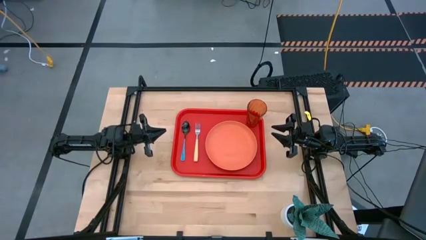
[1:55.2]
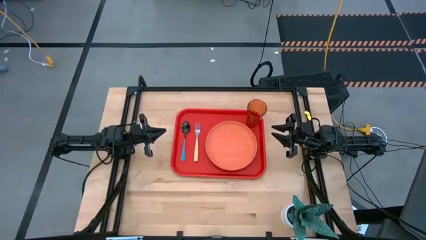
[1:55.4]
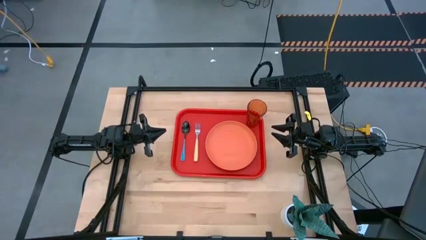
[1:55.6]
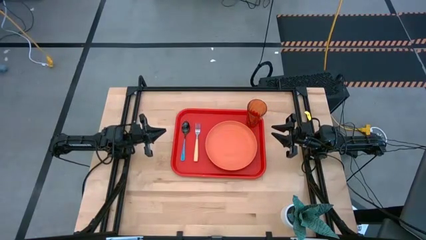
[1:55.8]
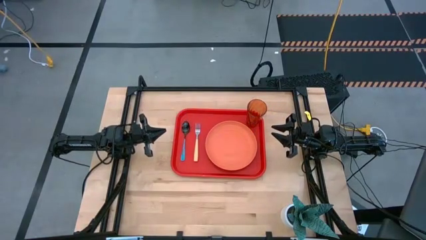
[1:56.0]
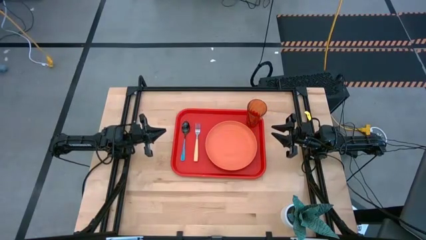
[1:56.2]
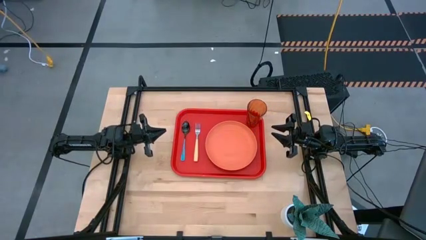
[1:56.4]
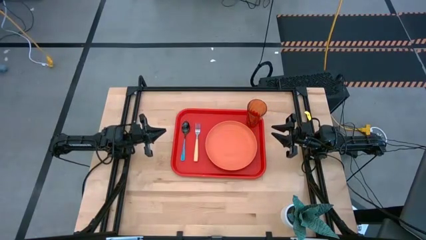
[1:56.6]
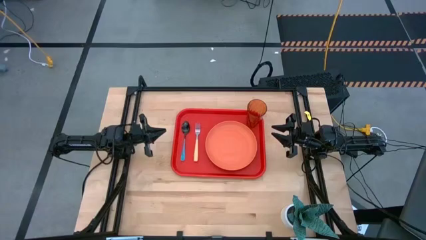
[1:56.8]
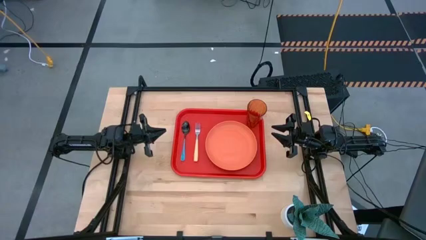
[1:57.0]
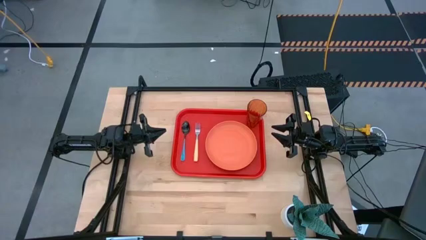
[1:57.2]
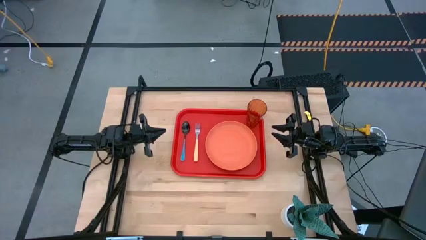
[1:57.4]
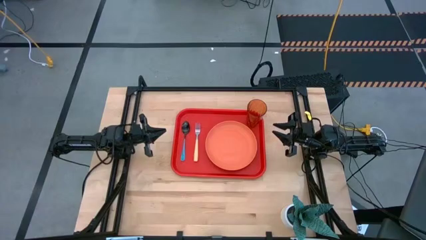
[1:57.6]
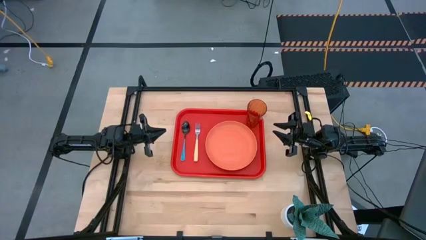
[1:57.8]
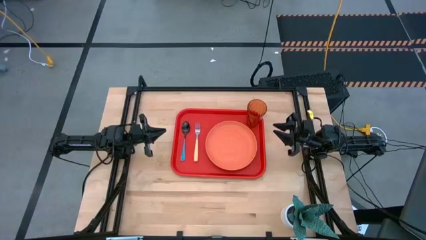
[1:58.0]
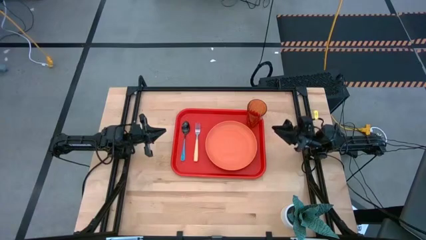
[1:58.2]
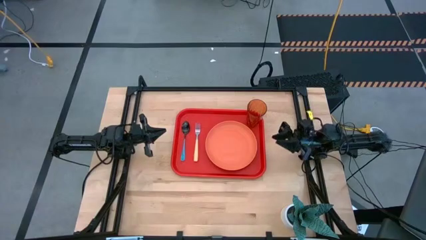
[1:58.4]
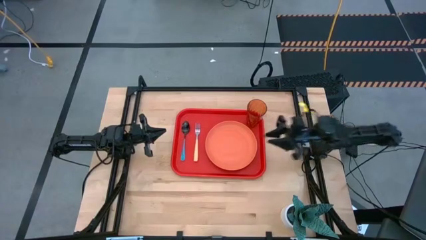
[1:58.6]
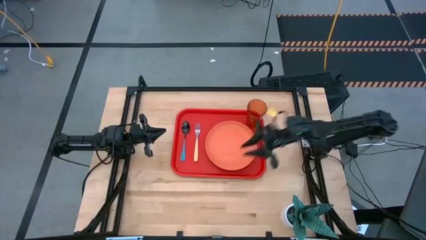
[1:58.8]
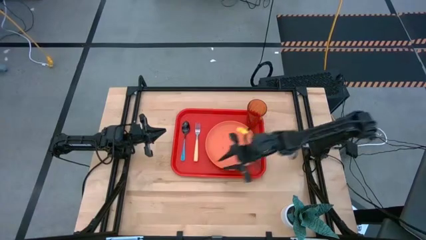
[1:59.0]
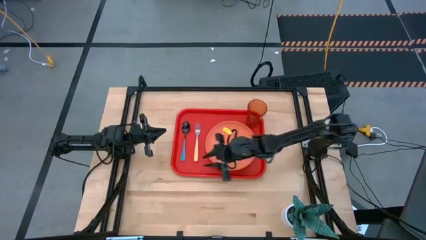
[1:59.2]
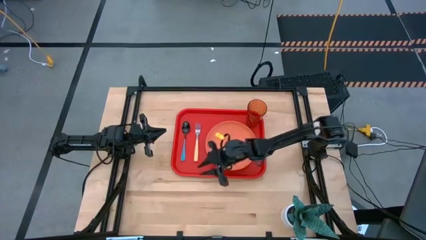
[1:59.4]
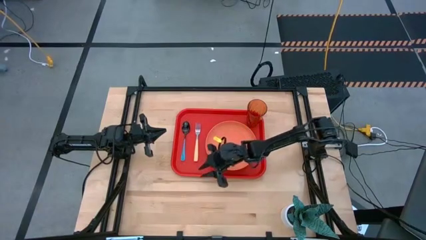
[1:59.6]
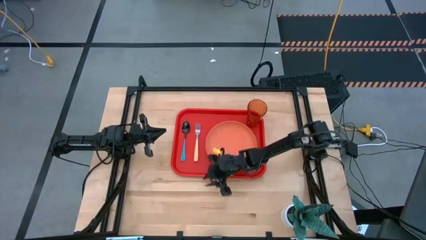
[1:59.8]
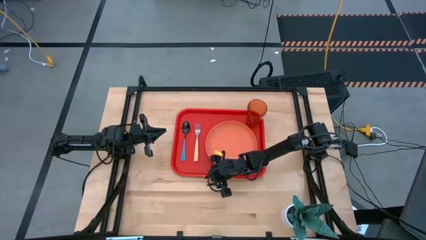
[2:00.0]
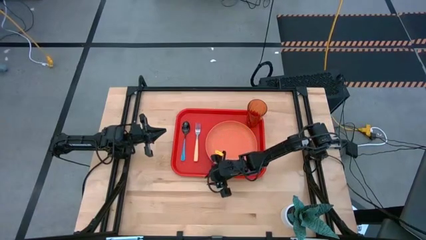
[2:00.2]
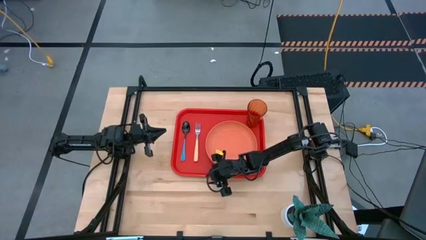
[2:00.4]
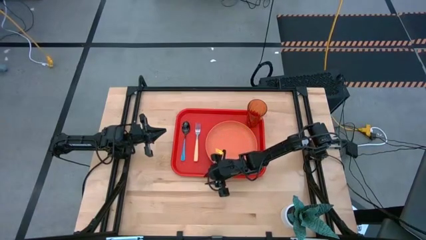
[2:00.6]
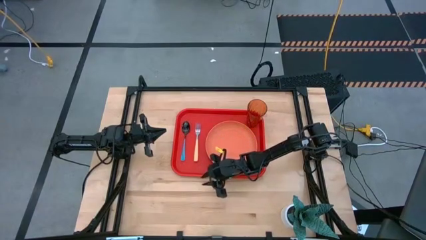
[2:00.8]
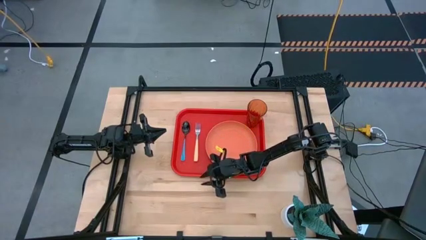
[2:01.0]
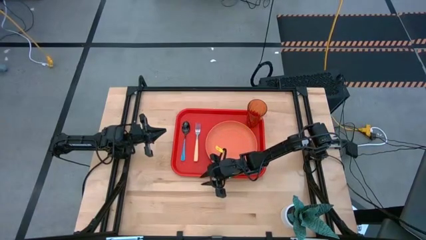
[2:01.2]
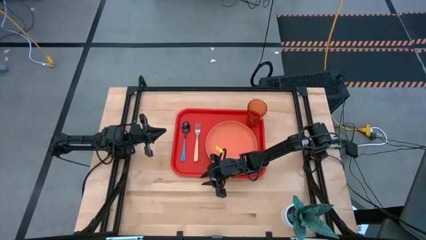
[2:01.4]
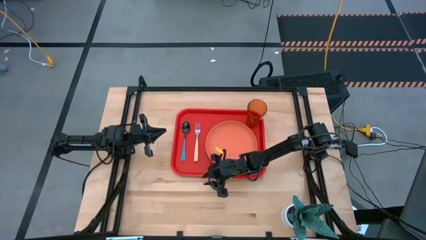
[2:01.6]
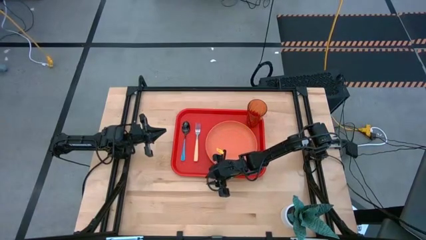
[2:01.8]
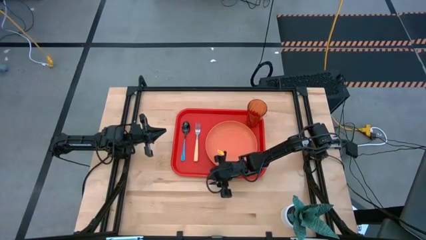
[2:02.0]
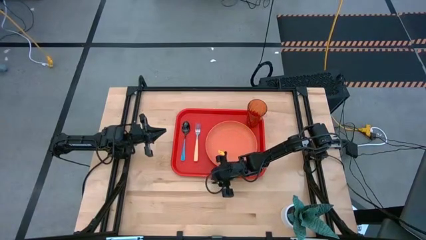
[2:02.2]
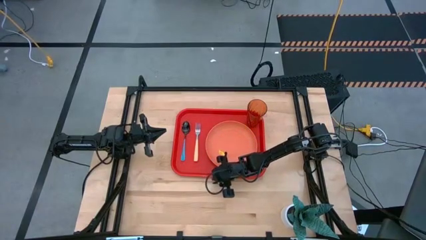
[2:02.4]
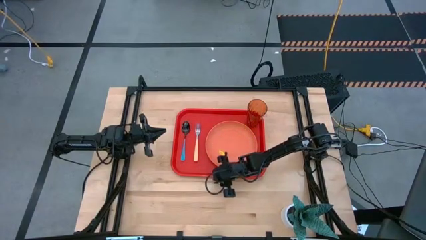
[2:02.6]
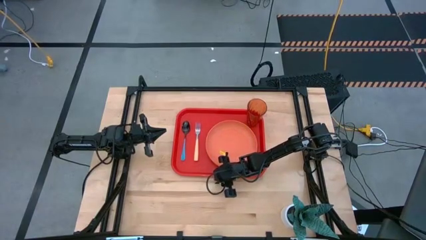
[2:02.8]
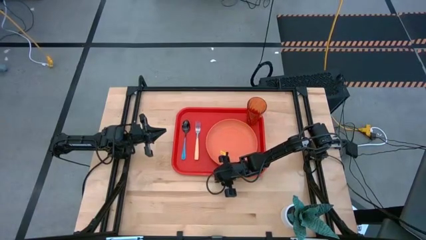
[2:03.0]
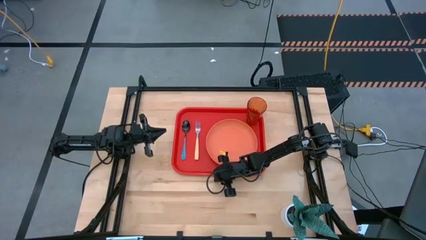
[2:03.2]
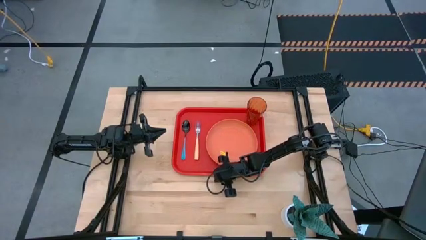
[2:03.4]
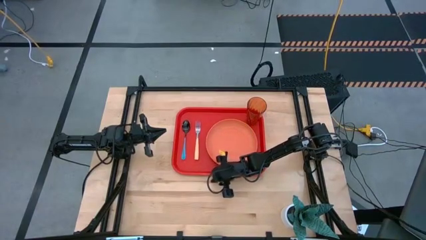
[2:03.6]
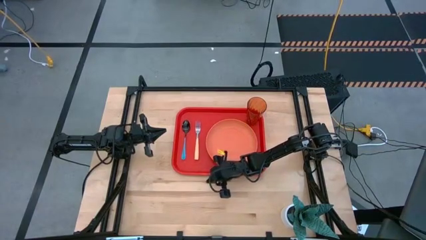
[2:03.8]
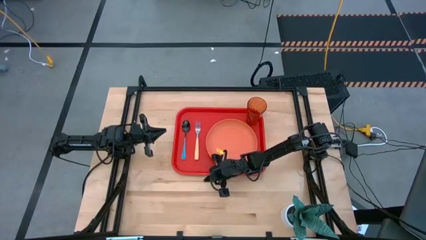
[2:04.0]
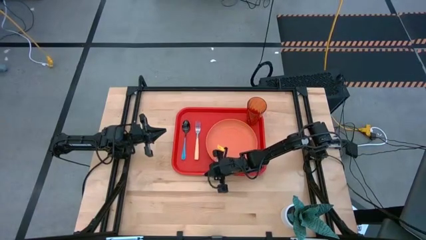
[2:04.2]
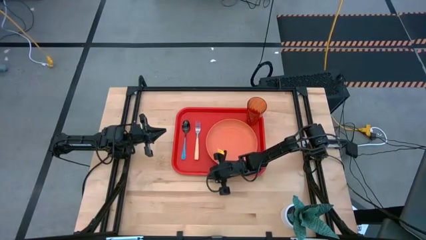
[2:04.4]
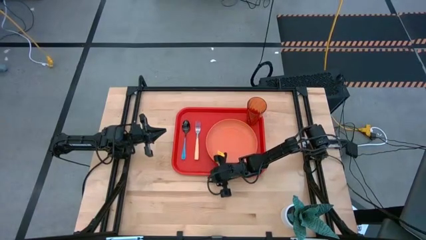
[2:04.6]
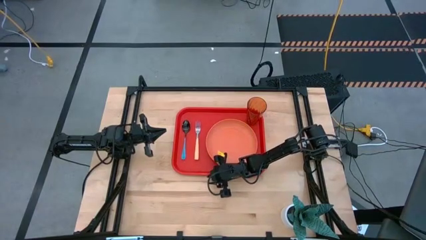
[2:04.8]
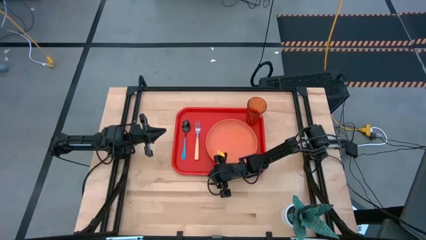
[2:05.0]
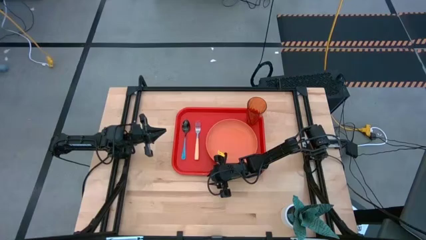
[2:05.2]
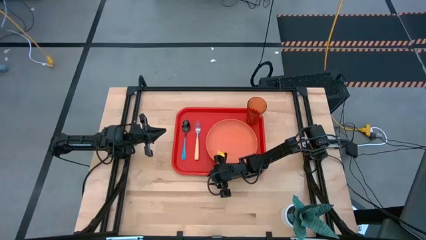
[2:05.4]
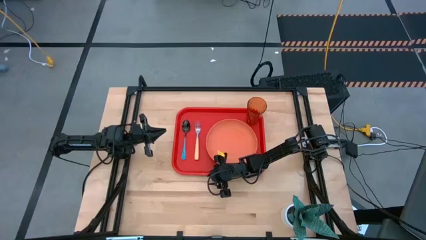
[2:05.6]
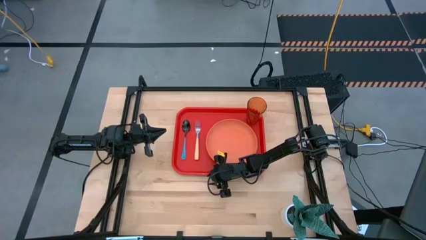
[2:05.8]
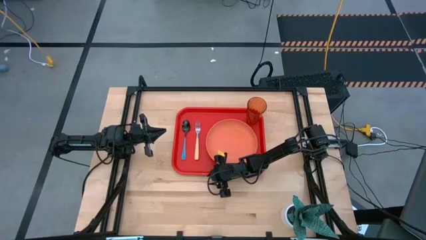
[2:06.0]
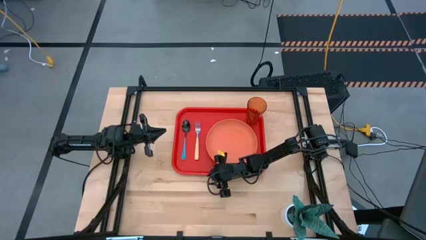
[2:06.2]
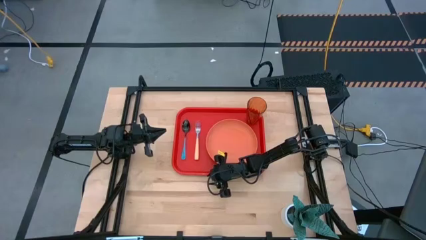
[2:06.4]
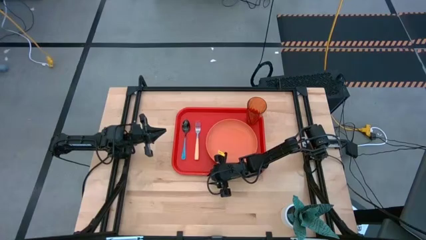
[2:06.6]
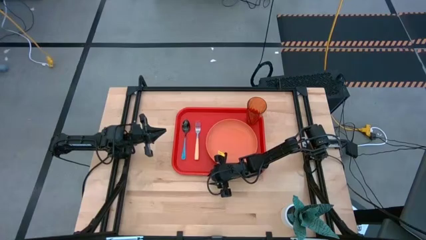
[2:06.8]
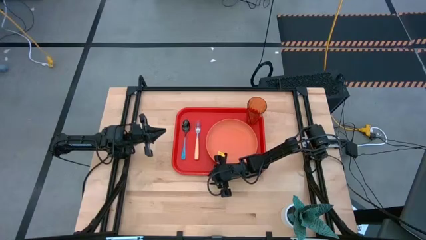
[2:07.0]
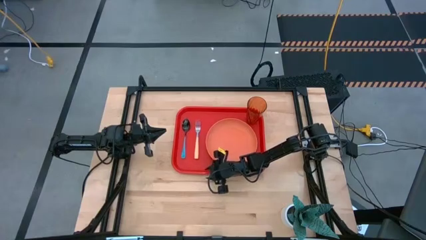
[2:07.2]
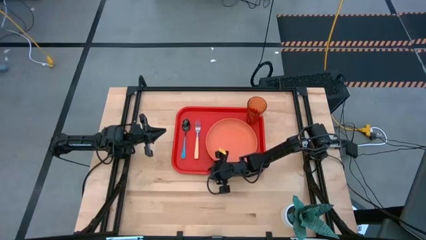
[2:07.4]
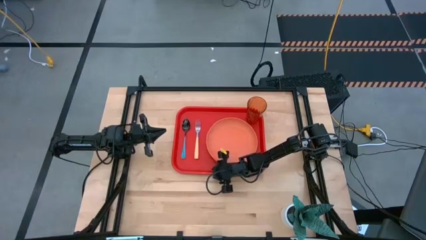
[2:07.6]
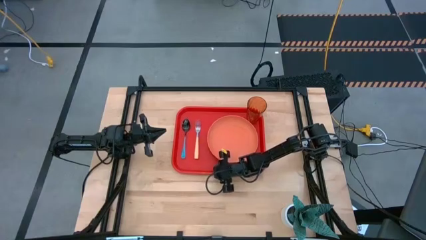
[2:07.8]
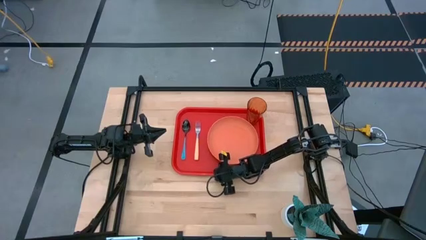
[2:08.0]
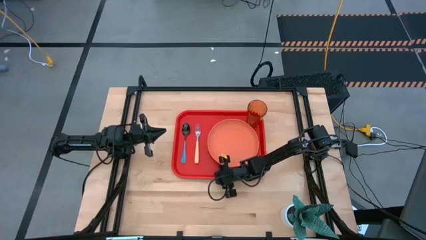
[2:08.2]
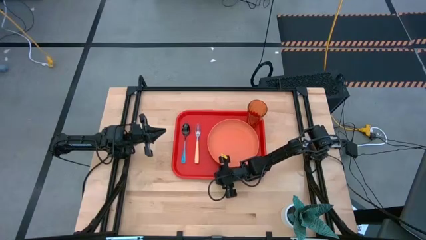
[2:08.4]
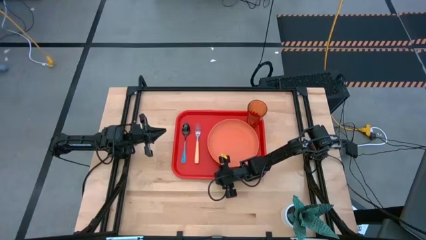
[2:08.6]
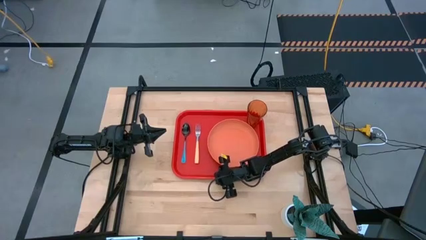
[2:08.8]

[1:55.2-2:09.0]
Task: Pick and place plate/cup/fork/spoon on tray
Adjust the blue spoon, orange plate, and the red tray

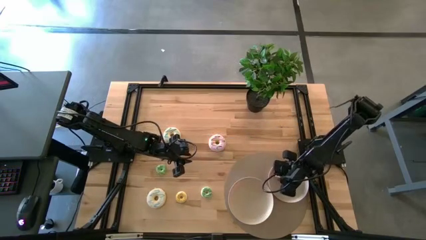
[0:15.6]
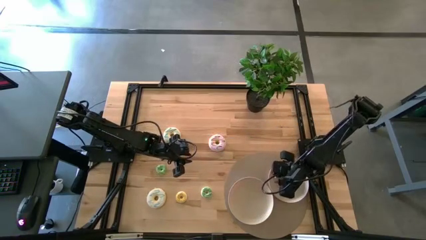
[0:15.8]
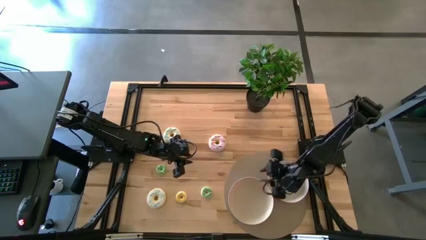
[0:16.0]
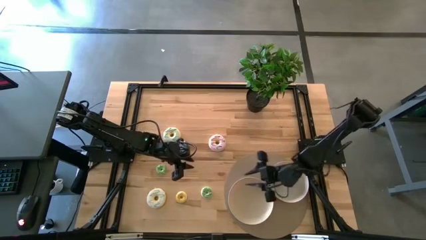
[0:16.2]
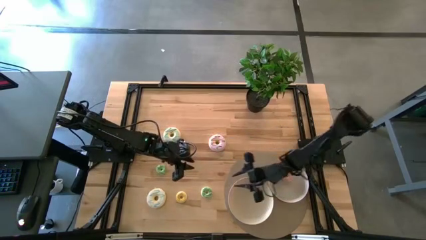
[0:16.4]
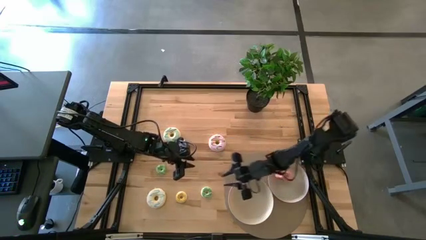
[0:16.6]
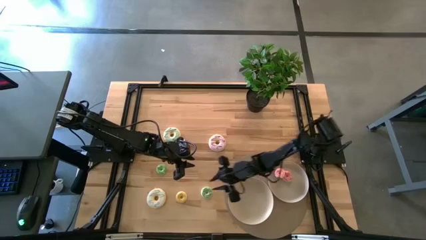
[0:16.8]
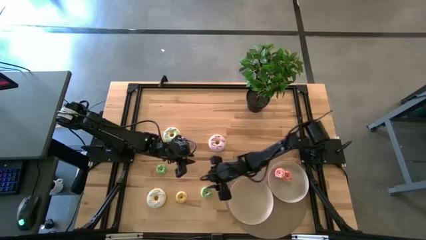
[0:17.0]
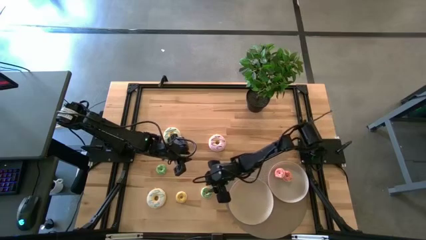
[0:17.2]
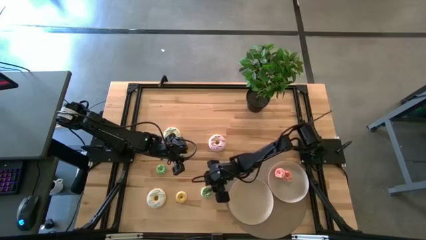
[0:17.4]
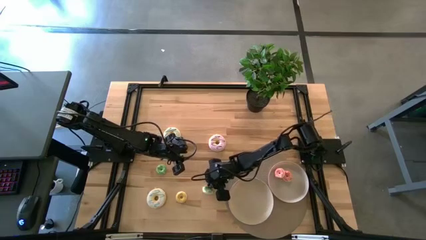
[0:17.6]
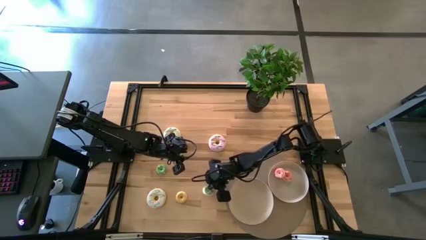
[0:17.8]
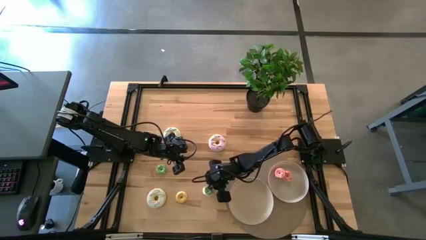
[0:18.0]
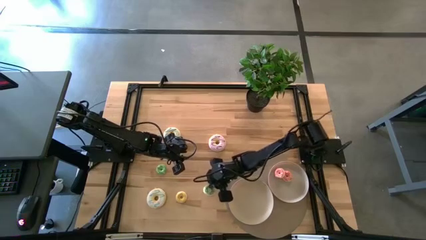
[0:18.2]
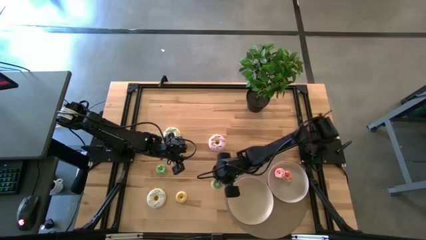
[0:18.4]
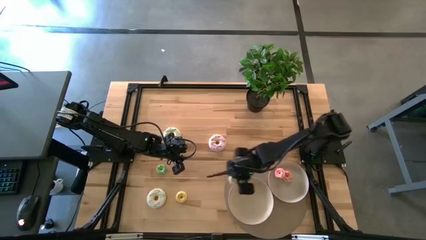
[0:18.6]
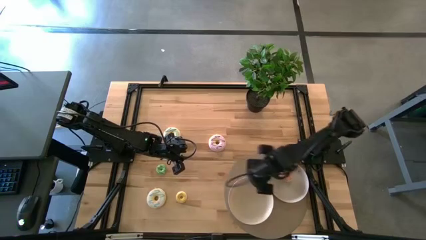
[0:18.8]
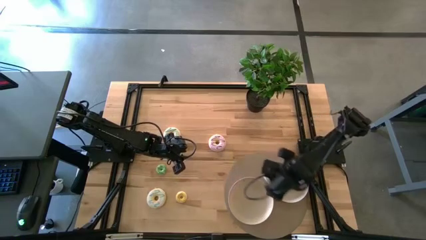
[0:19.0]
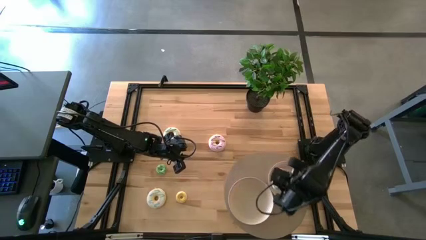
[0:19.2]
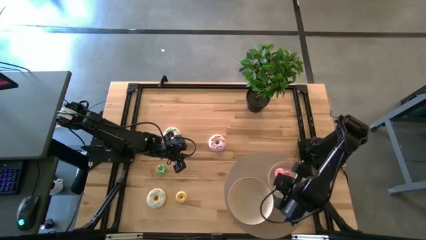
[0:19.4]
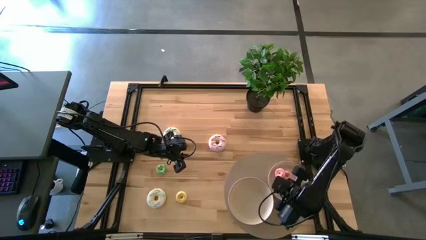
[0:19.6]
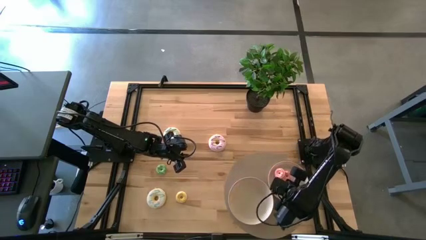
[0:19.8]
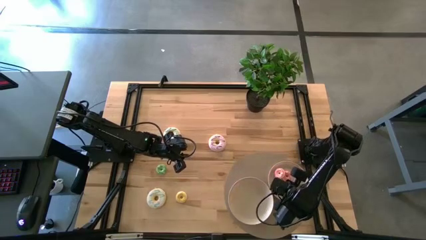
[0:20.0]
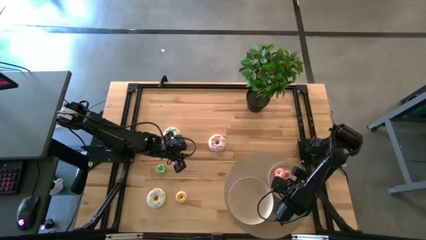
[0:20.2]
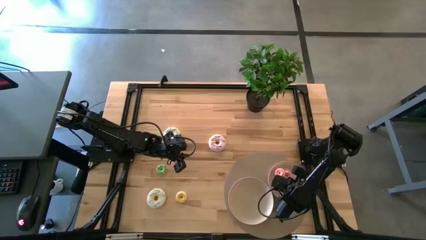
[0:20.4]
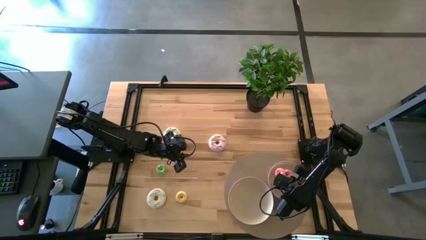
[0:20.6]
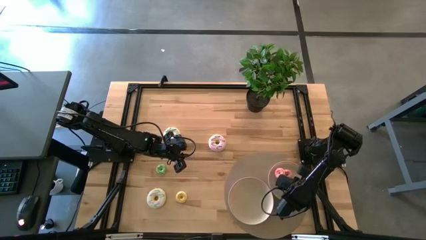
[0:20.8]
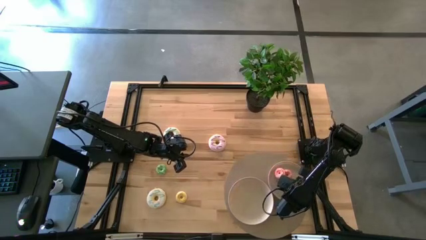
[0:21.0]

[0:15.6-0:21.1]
Task: Pick & Place donuts
Put the bottom small green donut into the right white plate
